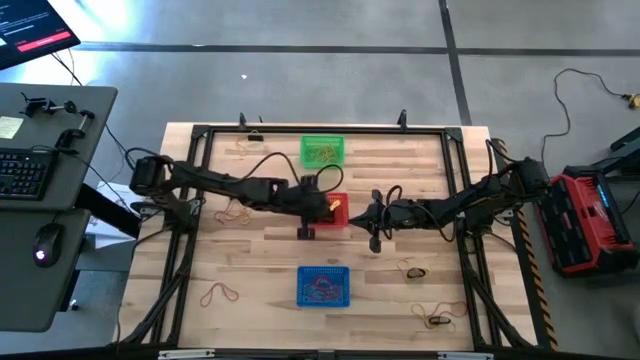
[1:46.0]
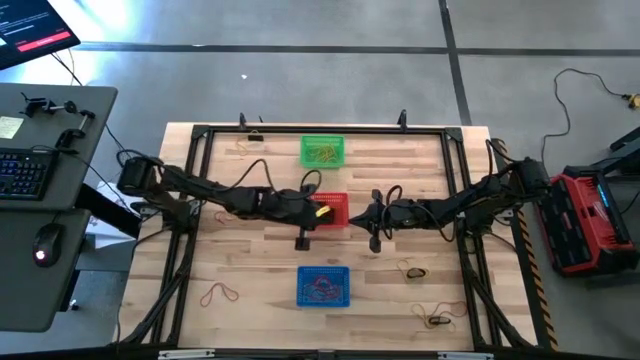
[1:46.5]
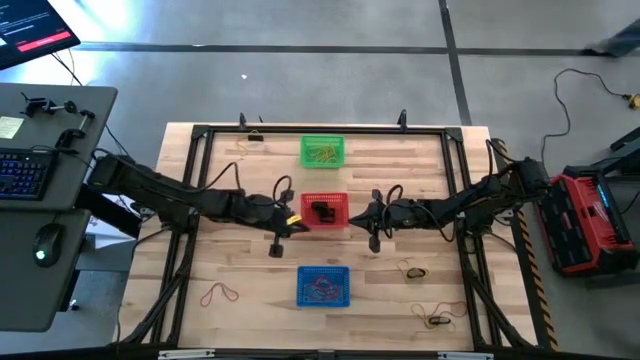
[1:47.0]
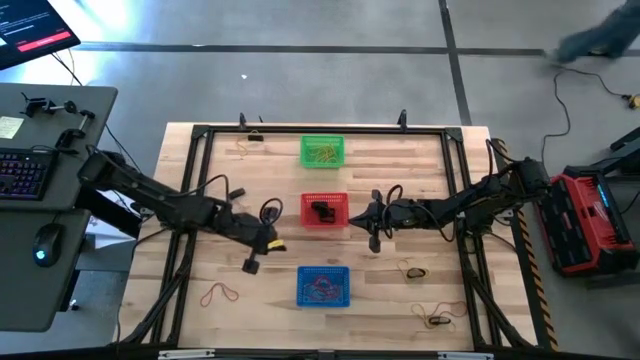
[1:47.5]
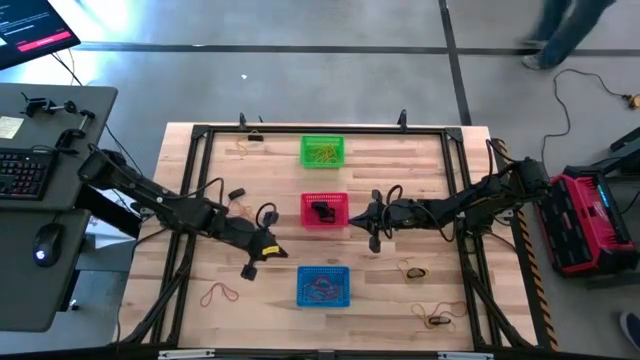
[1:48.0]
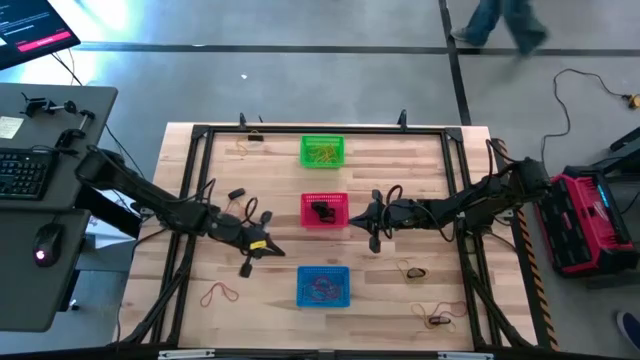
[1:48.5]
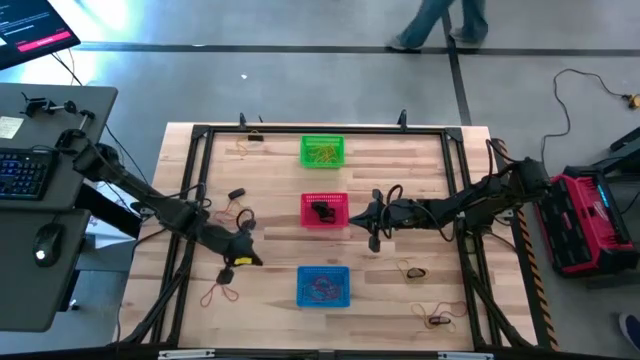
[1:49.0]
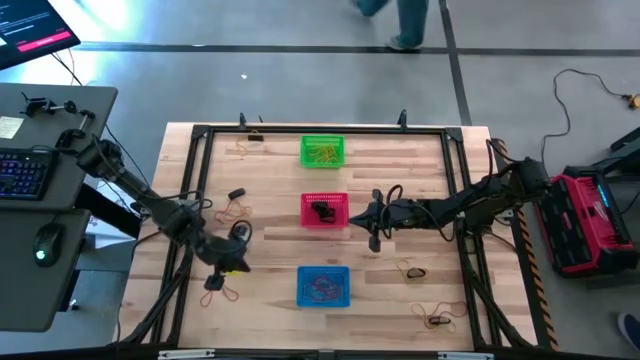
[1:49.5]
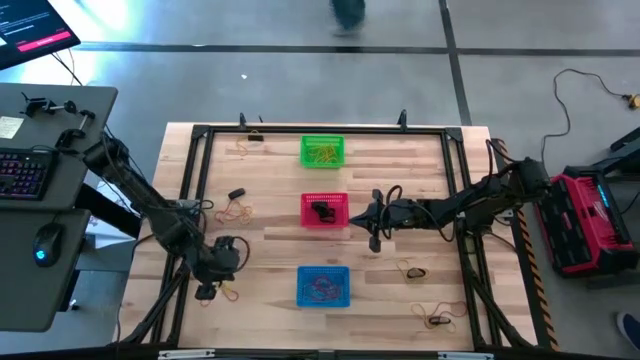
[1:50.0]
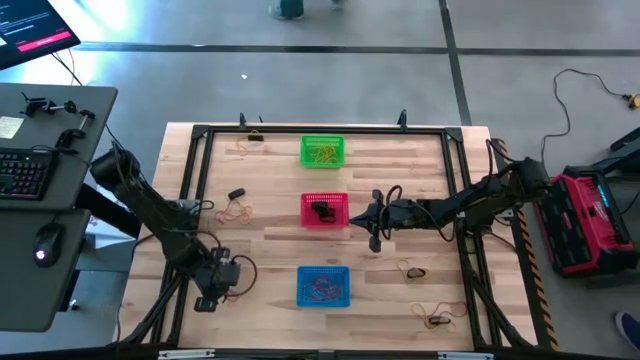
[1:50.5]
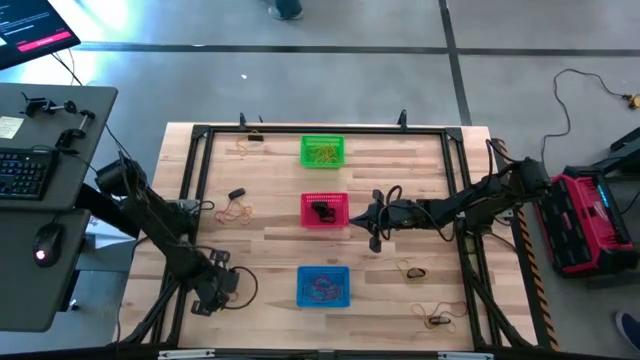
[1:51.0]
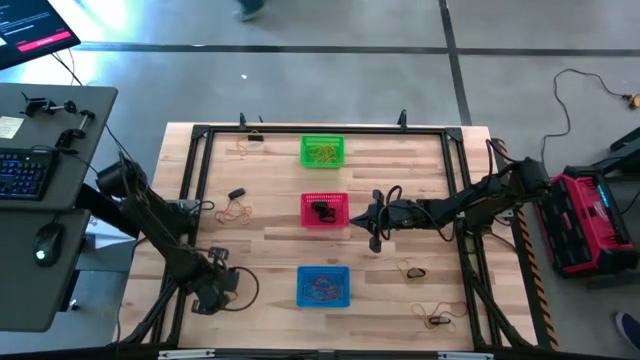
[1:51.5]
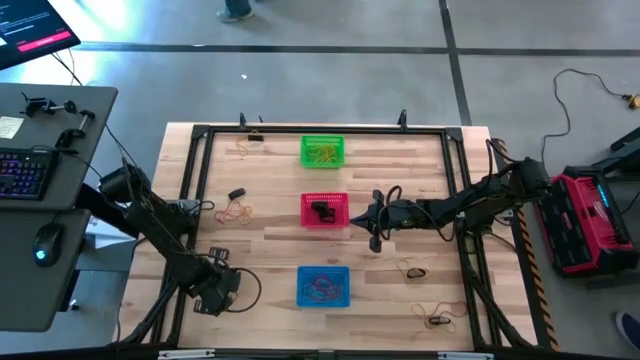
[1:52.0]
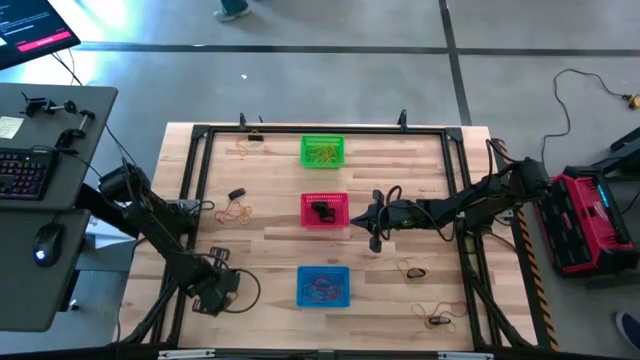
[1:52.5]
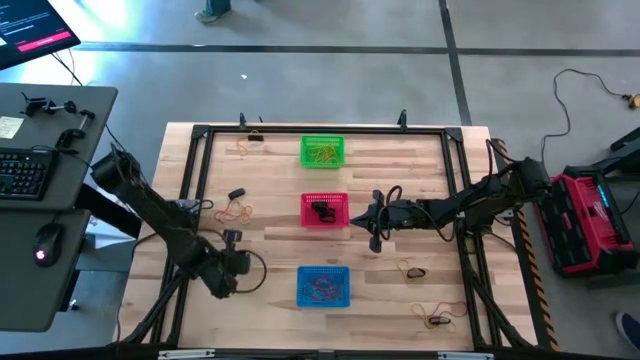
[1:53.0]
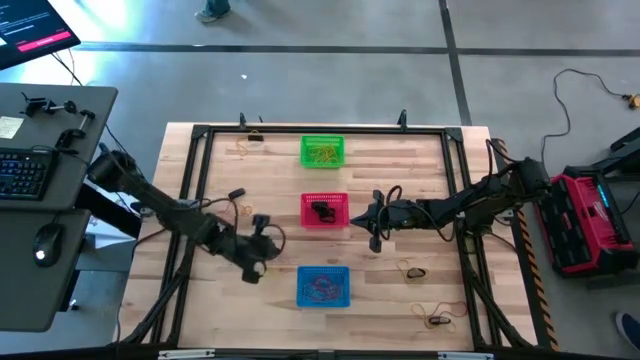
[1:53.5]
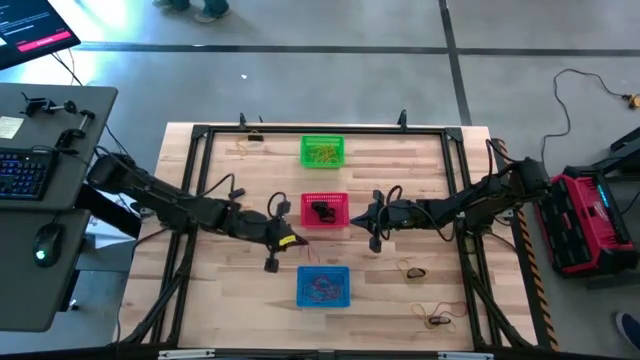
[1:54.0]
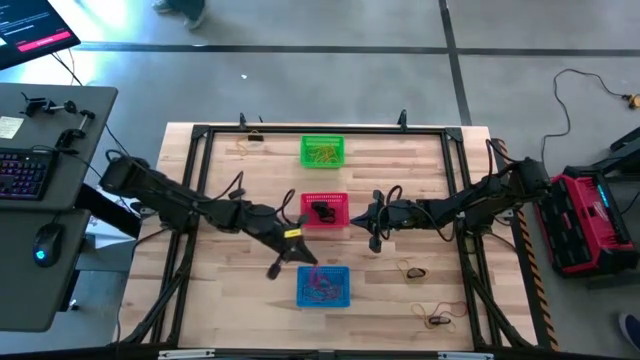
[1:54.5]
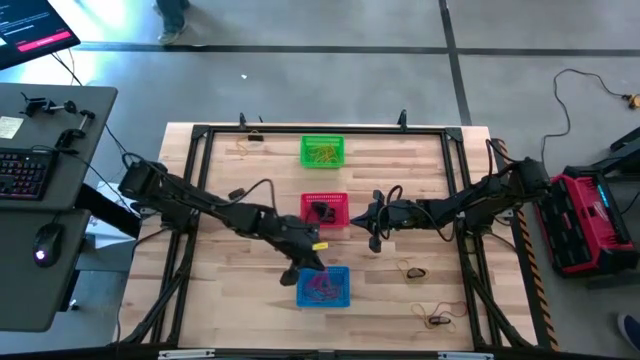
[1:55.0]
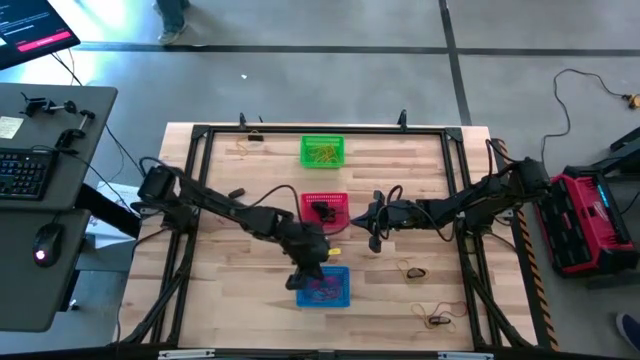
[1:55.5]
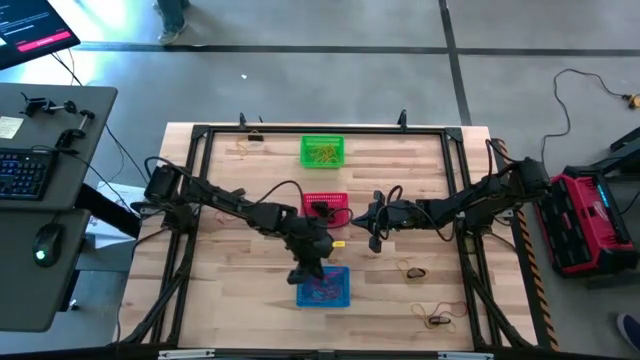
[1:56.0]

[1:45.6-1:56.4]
Task: Sort rubber bands into baskets
Put the red rubber band into the blue bin

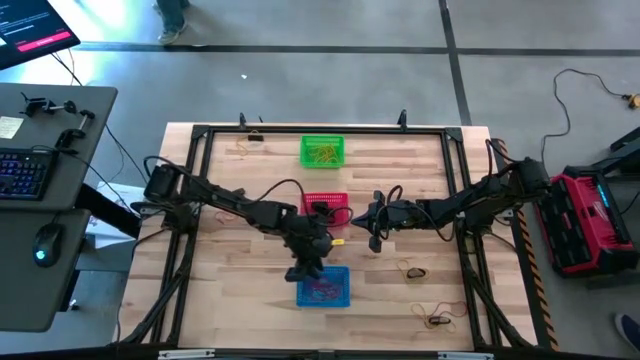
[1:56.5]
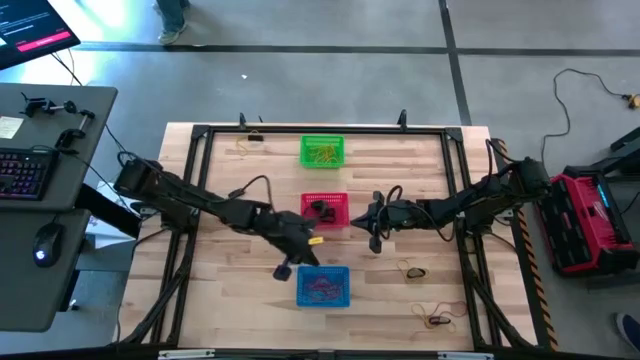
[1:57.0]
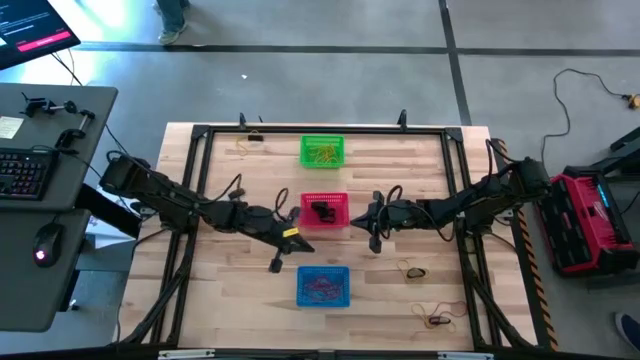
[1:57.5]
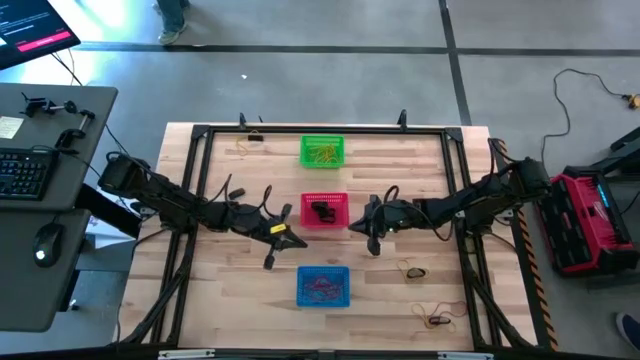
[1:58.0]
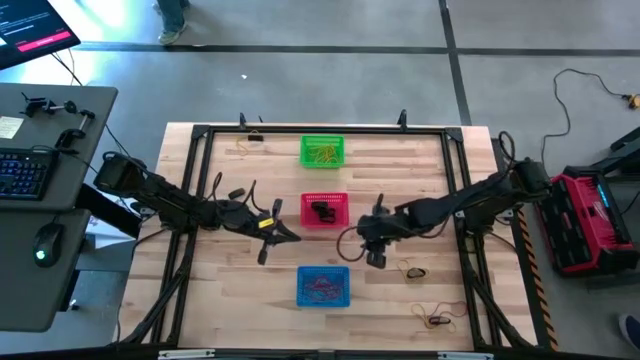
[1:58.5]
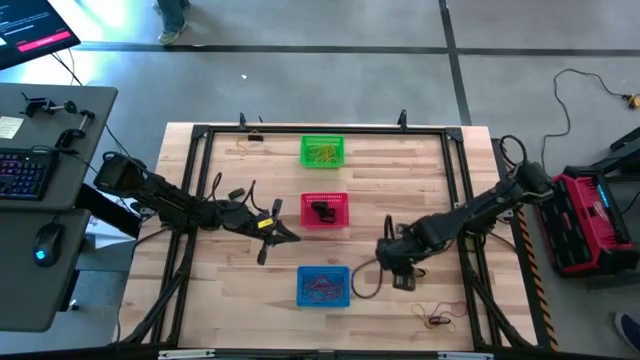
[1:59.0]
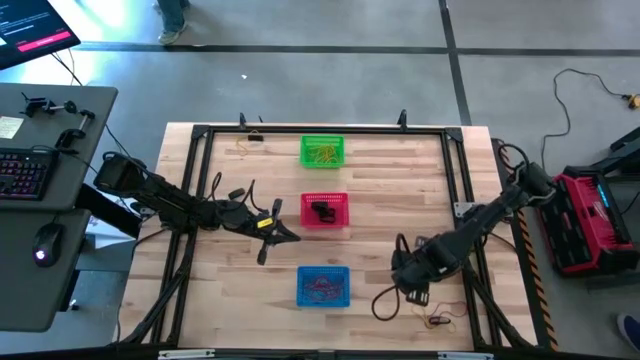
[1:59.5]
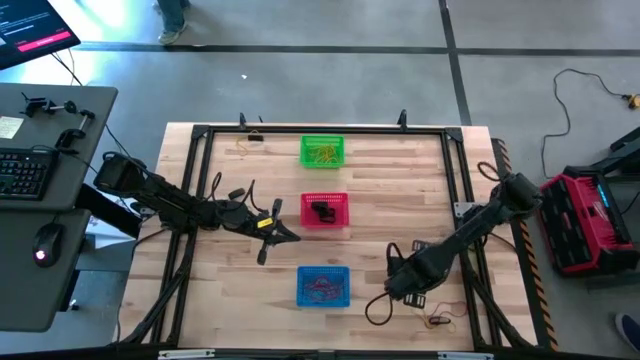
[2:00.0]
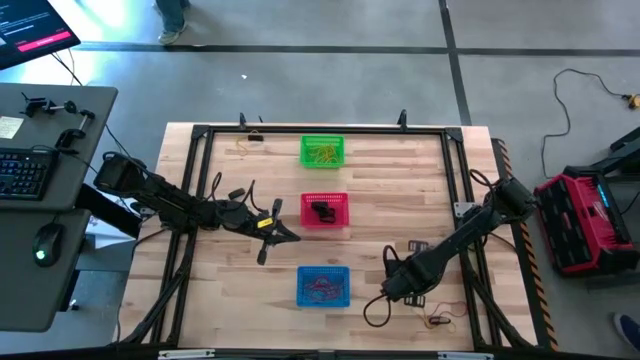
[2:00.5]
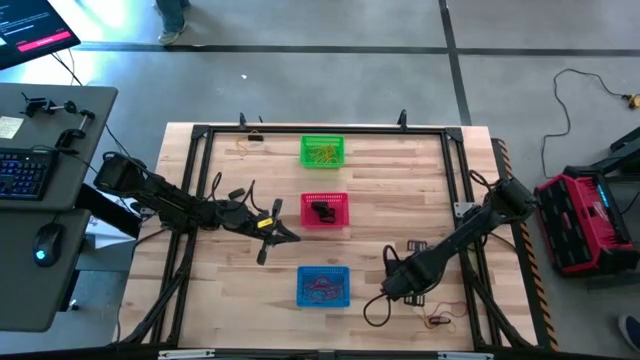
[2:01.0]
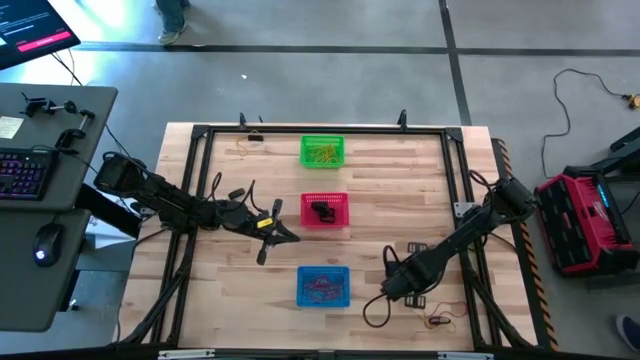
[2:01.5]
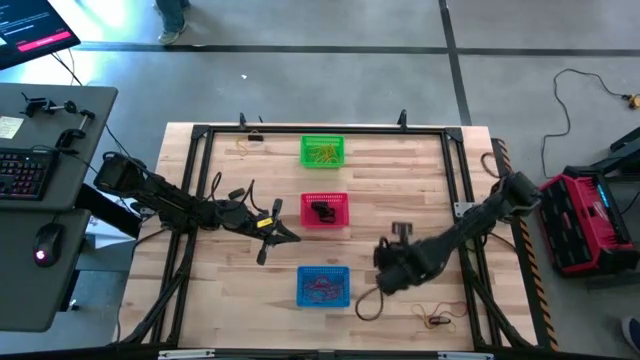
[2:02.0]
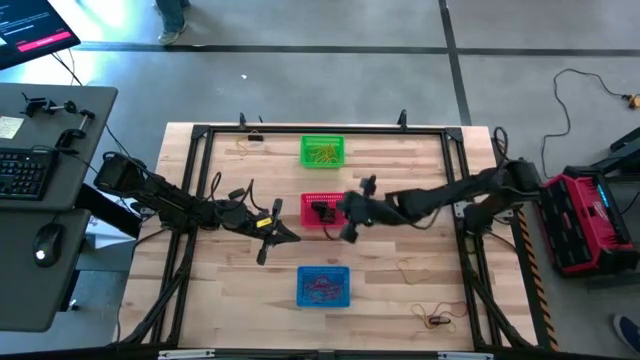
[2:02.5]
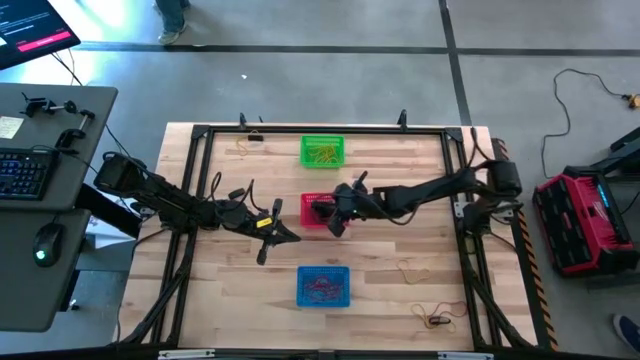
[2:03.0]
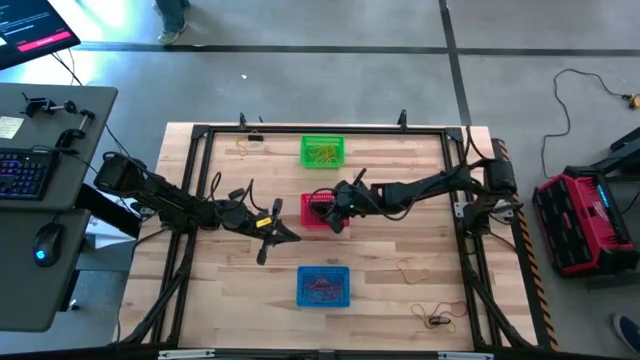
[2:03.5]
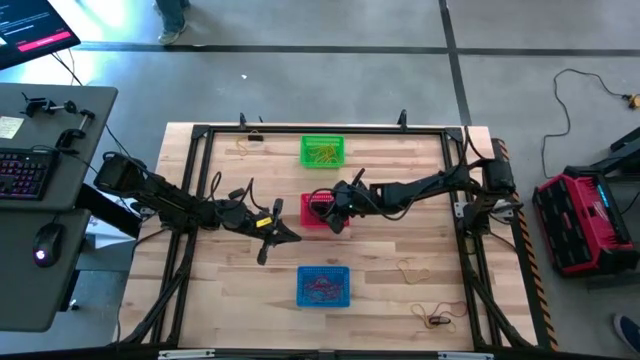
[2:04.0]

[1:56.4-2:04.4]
Put the black rubber band into the red bin

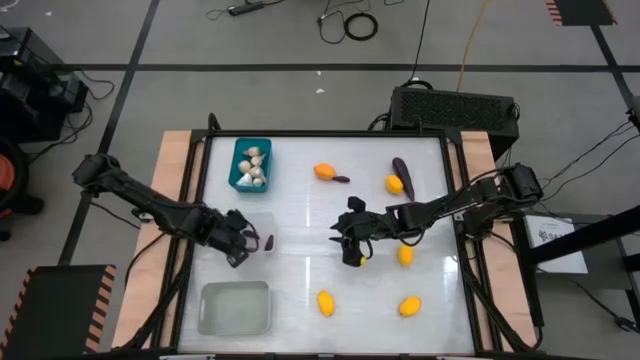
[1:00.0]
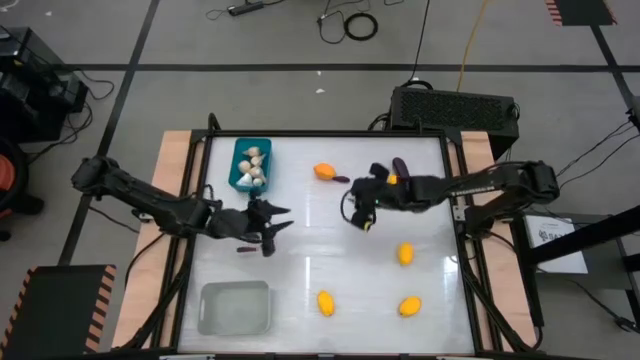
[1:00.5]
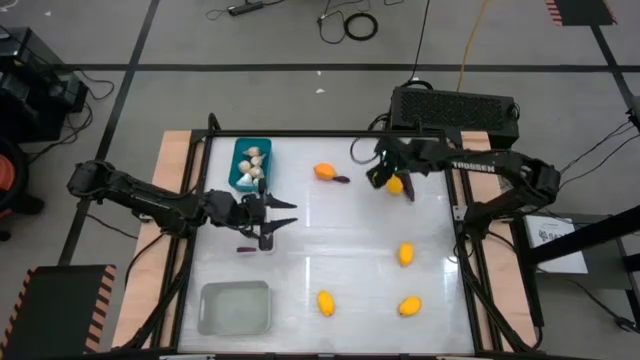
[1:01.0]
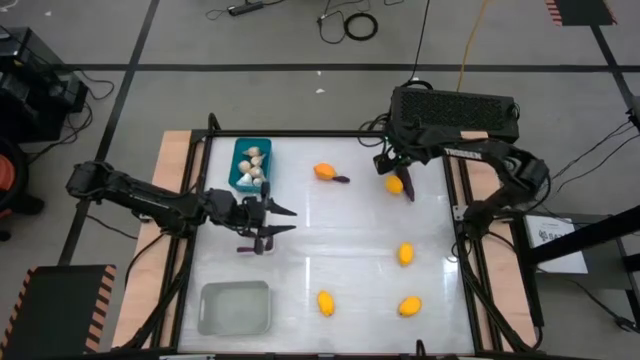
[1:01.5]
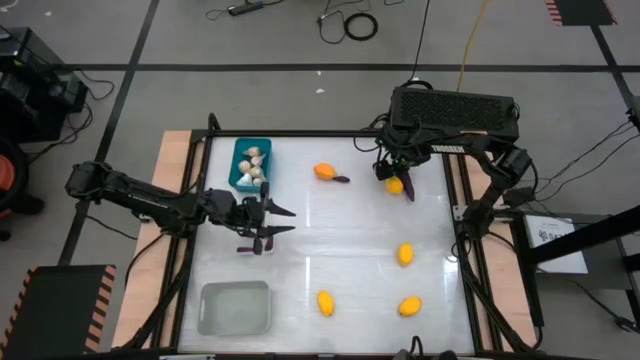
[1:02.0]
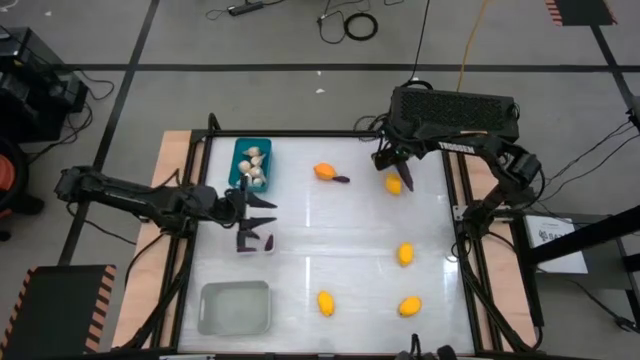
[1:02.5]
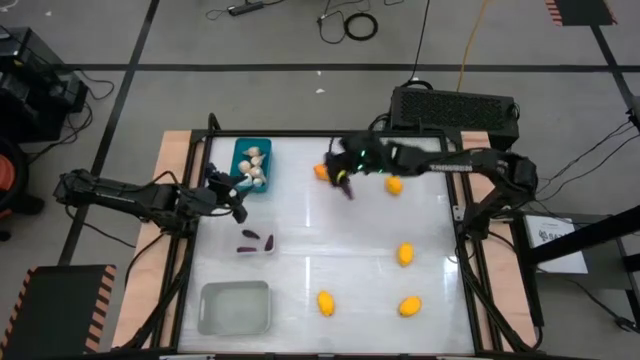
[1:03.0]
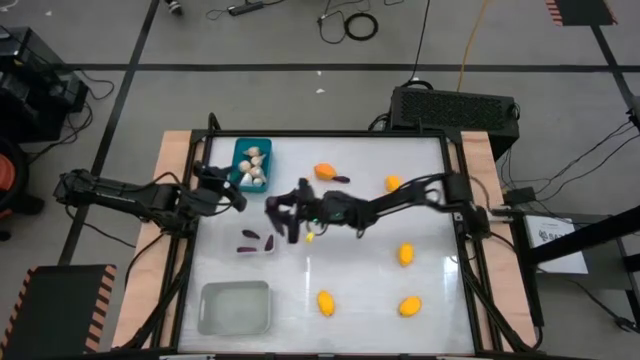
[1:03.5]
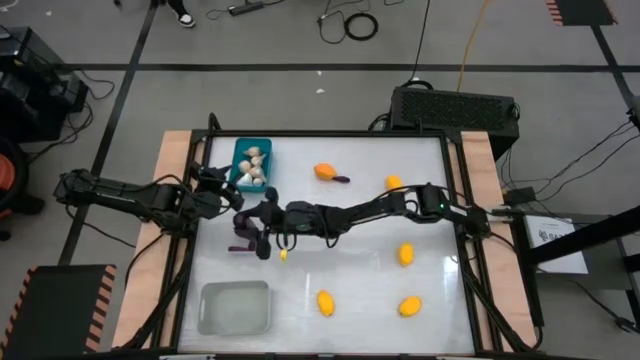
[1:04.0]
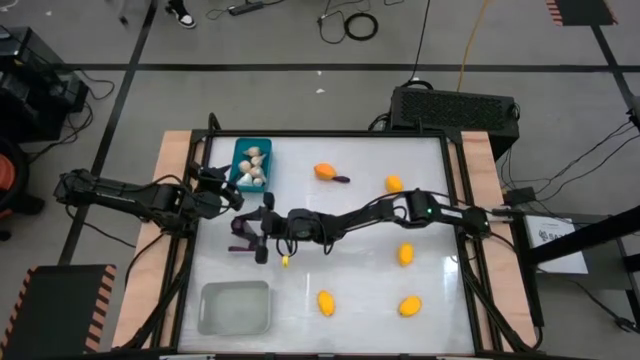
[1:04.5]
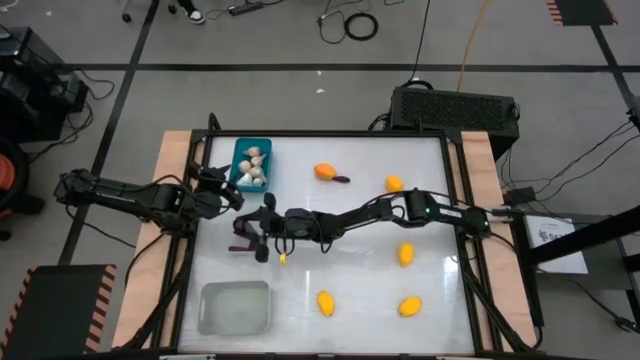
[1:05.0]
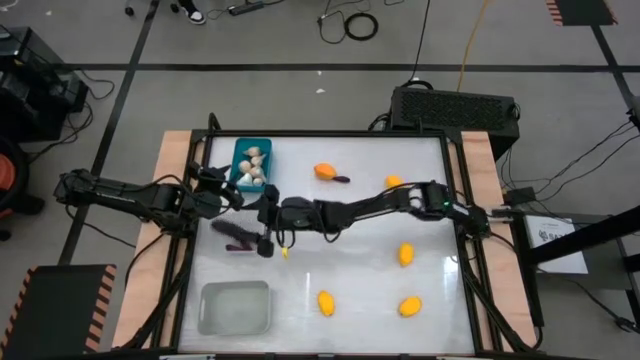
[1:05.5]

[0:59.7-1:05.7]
Task: Sort produce into baskets
Put the eggplant into the transparent bin
